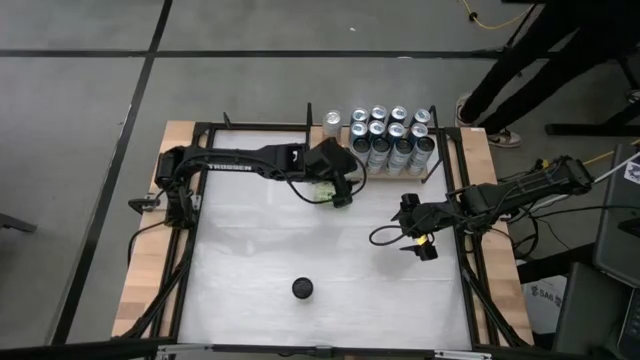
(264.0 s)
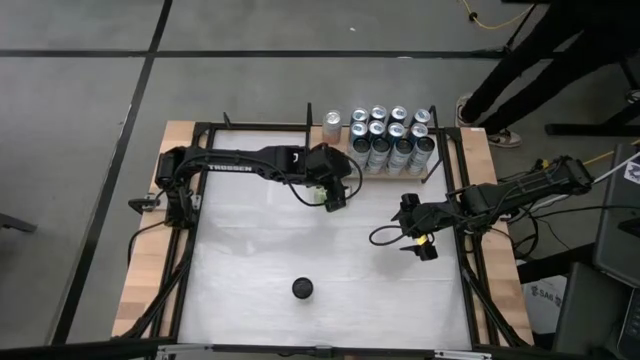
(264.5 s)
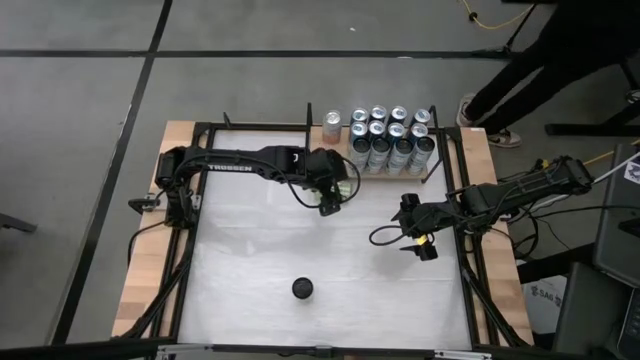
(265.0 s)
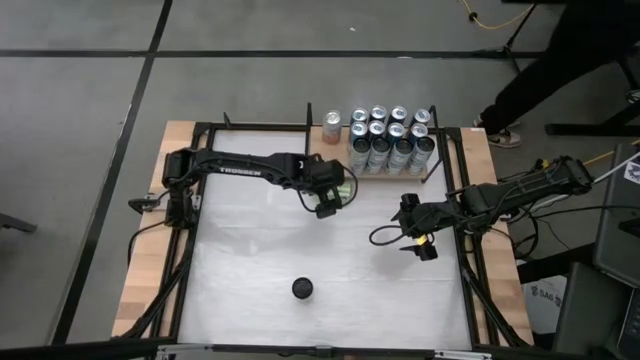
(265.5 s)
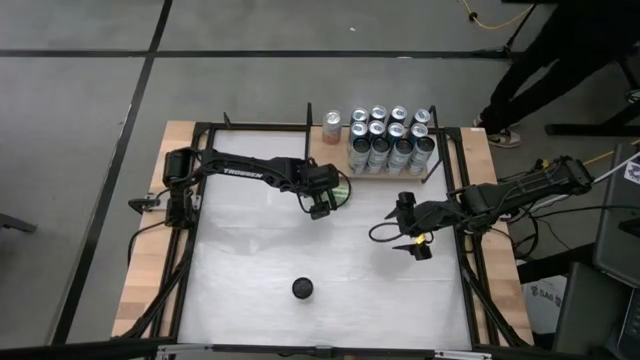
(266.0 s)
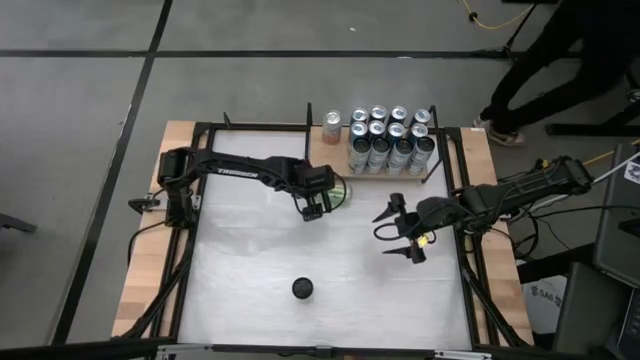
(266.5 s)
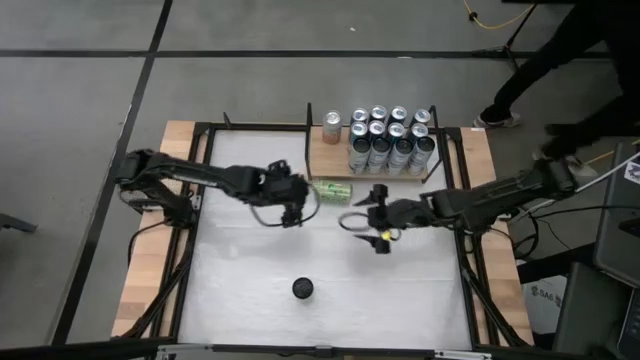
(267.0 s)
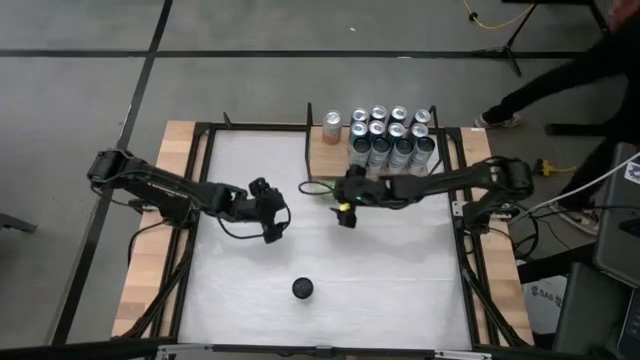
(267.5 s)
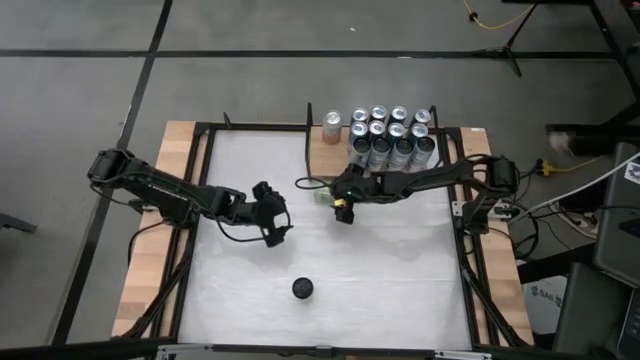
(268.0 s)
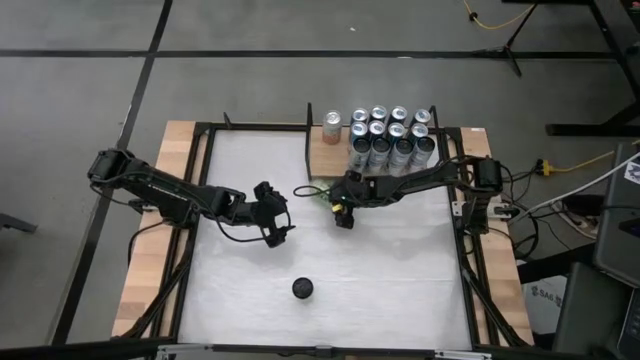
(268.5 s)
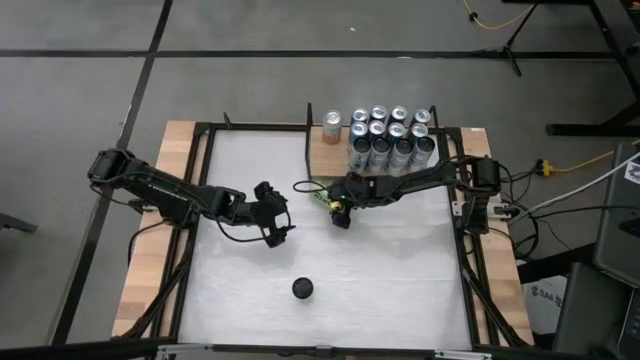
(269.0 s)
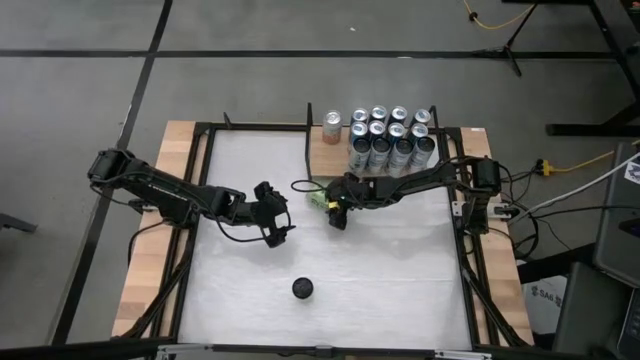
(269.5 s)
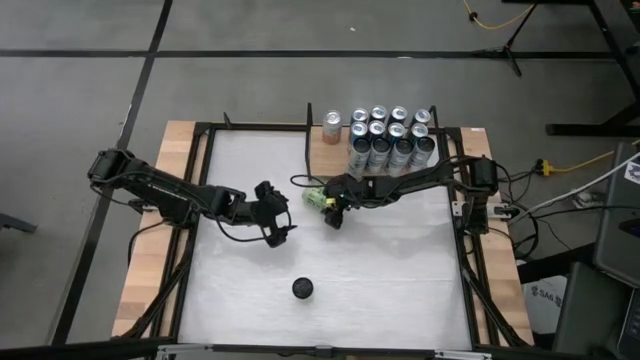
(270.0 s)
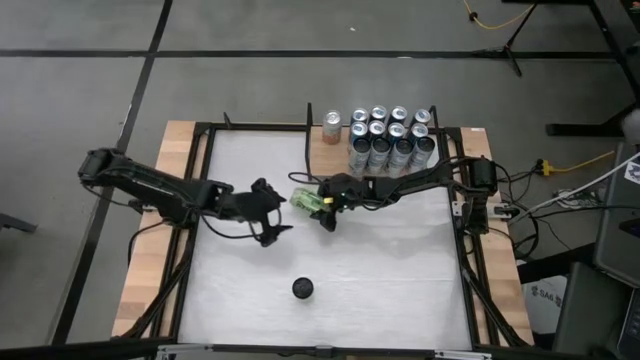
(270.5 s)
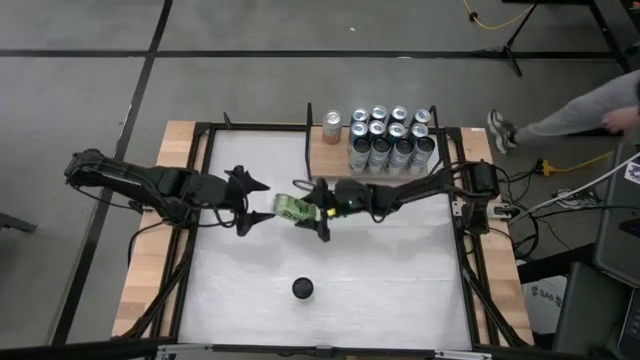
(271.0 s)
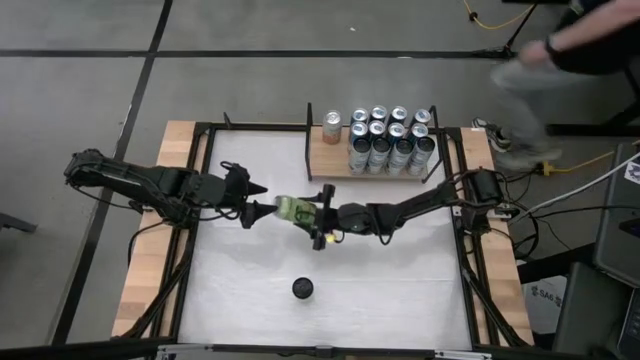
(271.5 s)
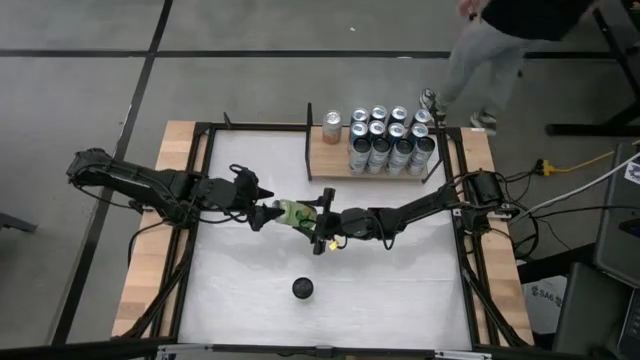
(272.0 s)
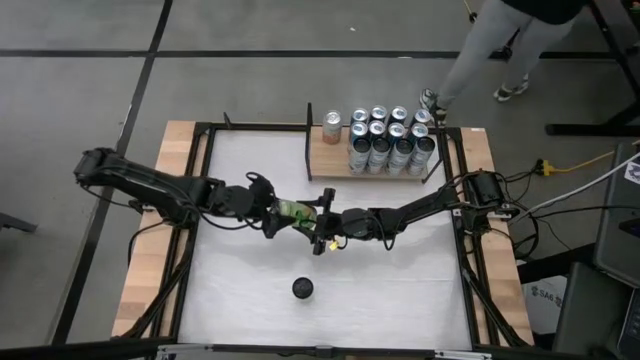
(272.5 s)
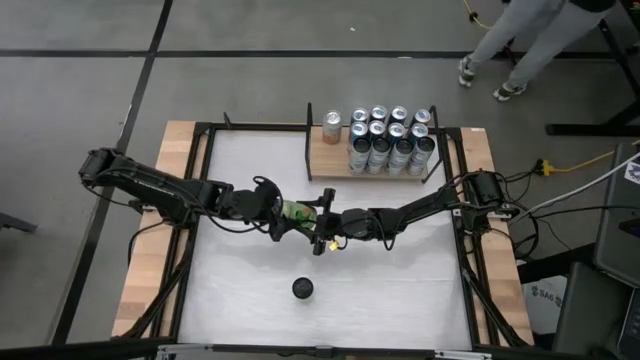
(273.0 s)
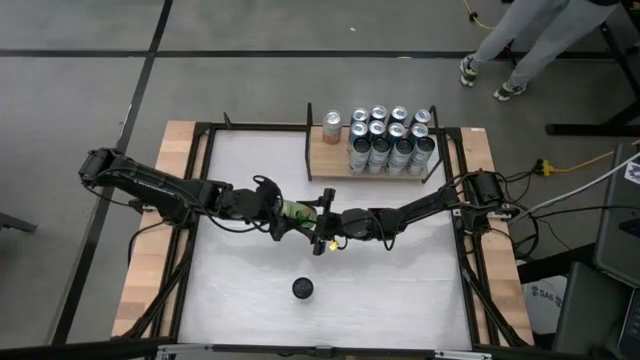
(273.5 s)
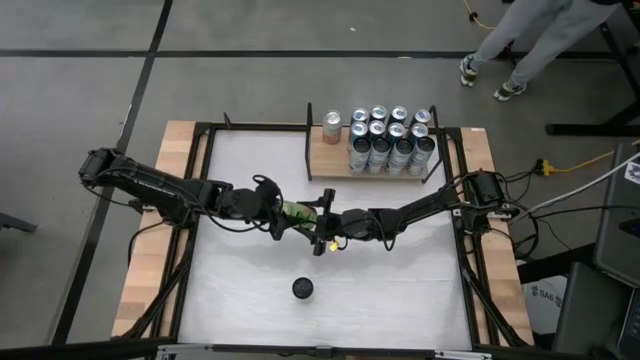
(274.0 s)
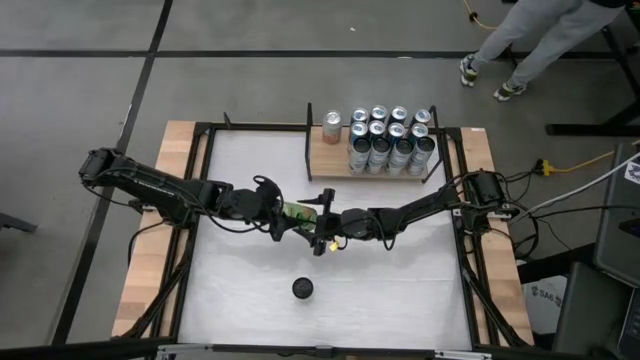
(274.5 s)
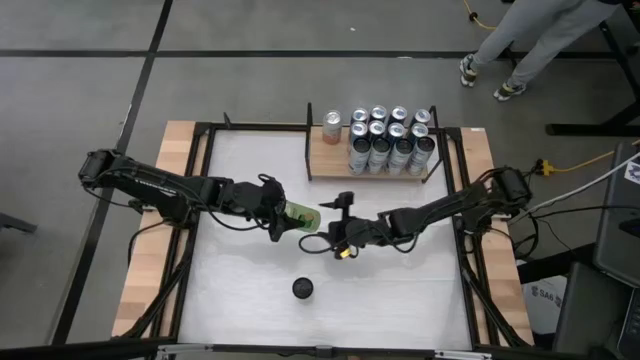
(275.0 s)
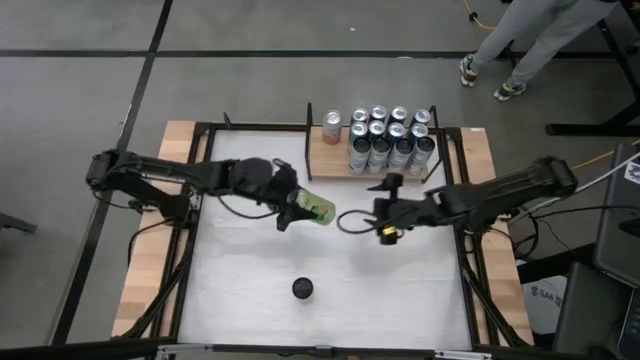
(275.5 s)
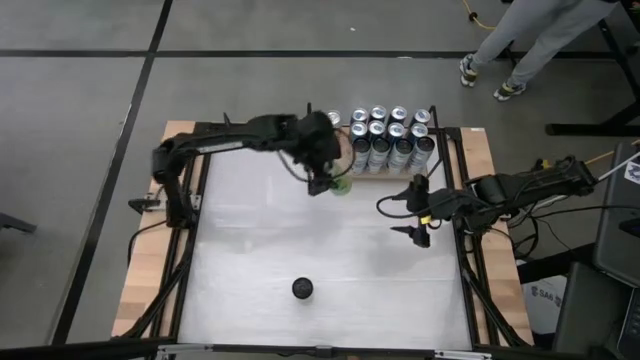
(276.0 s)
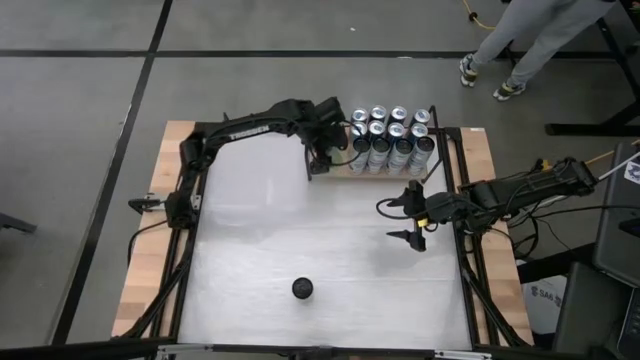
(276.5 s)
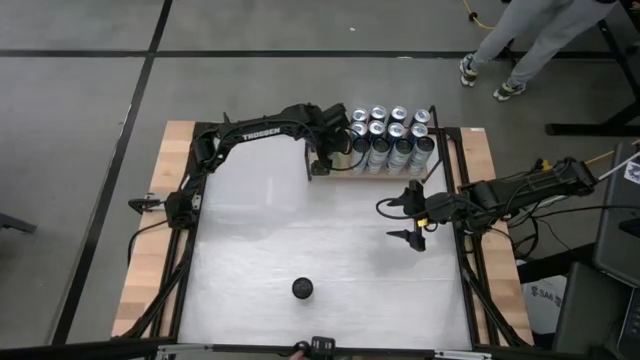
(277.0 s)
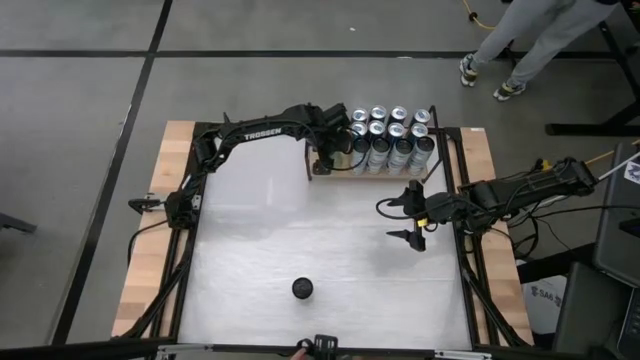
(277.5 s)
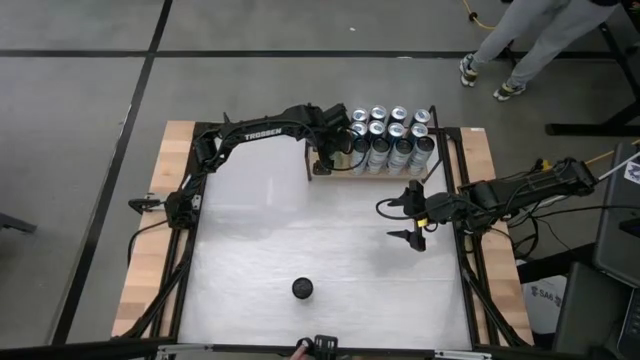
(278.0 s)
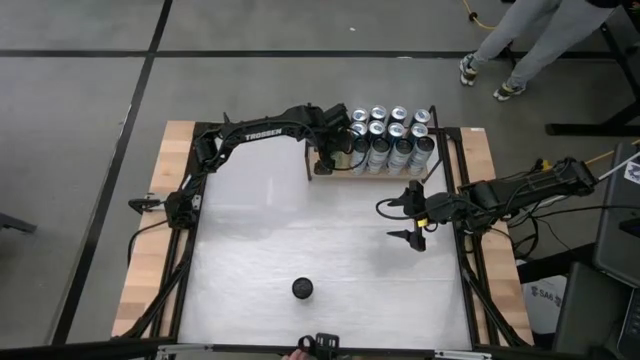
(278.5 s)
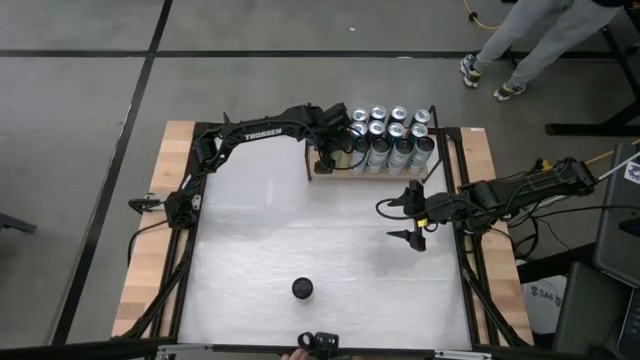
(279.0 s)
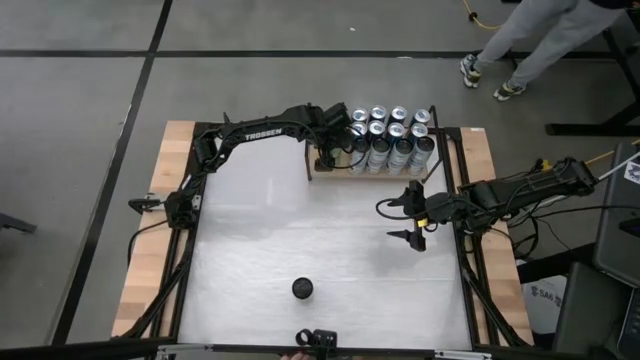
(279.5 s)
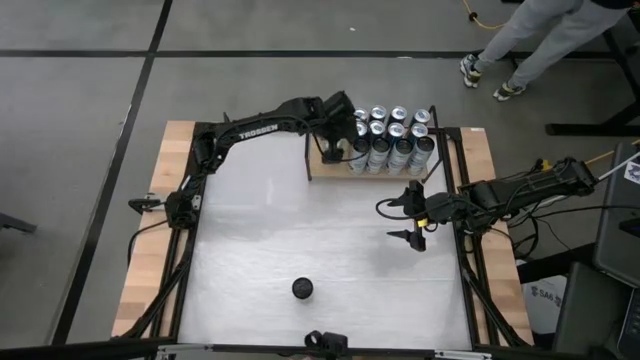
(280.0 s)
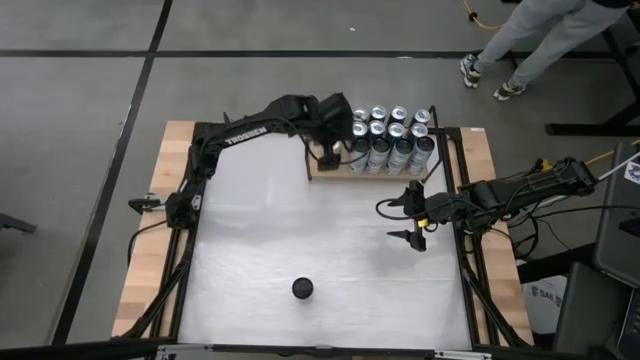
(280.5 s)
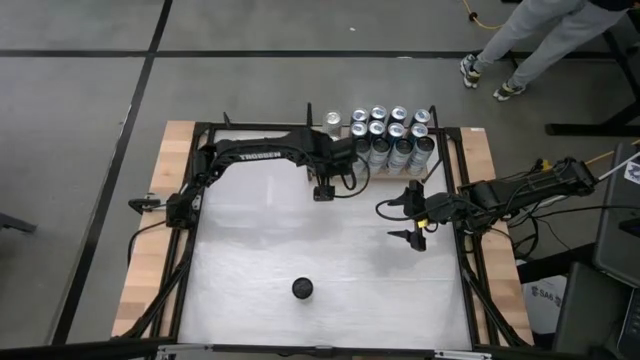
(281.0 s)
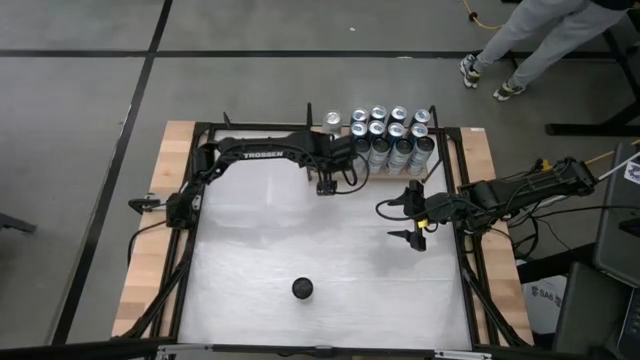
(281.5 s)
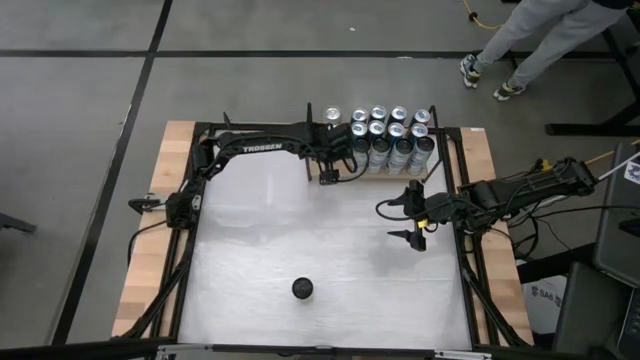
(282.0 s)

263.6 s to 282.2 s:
Task: Place canned beverage on shelf
Put the green soda can on the shelf

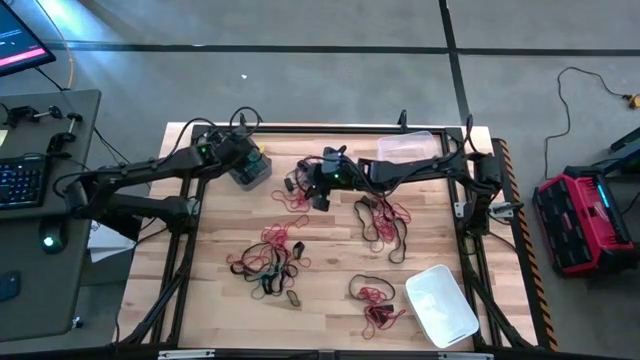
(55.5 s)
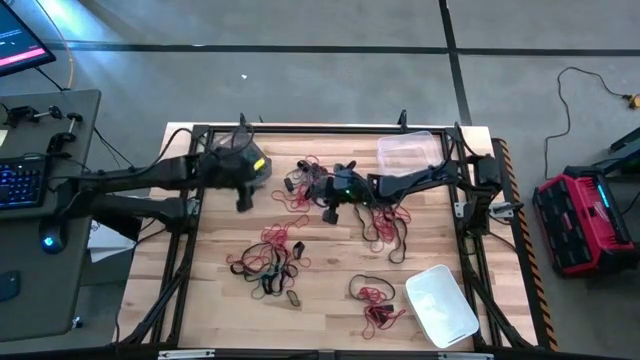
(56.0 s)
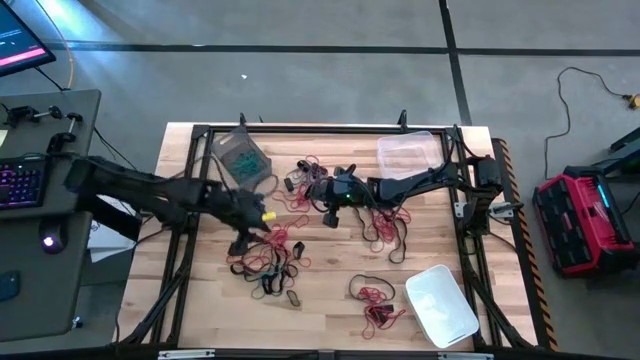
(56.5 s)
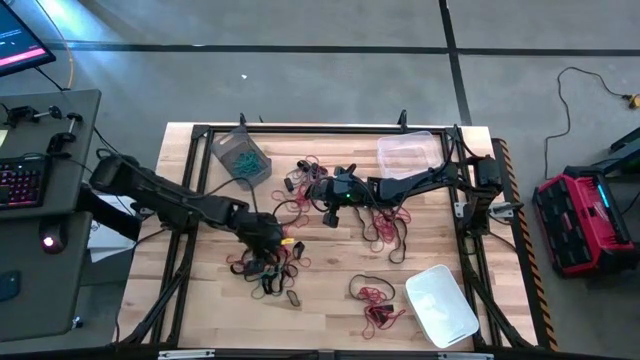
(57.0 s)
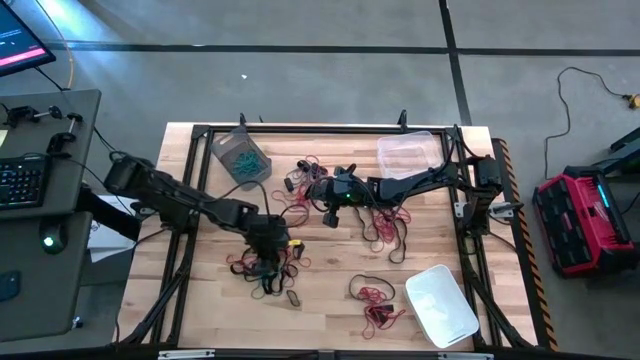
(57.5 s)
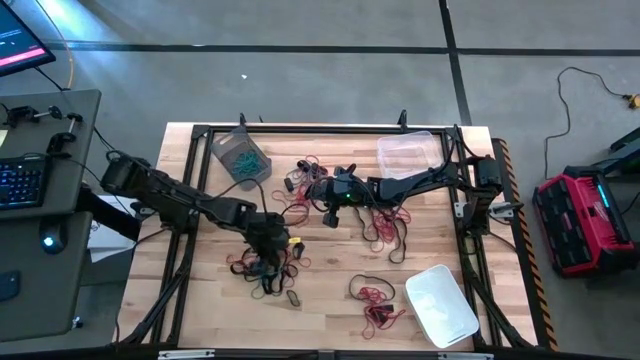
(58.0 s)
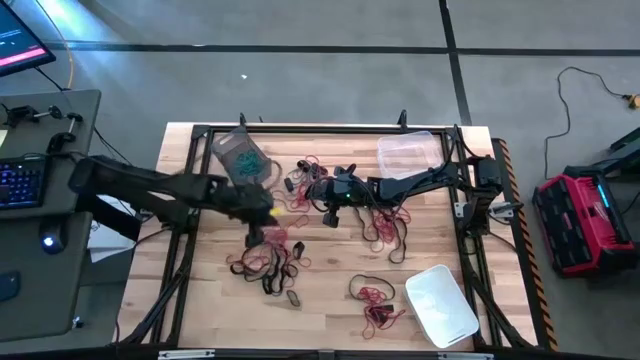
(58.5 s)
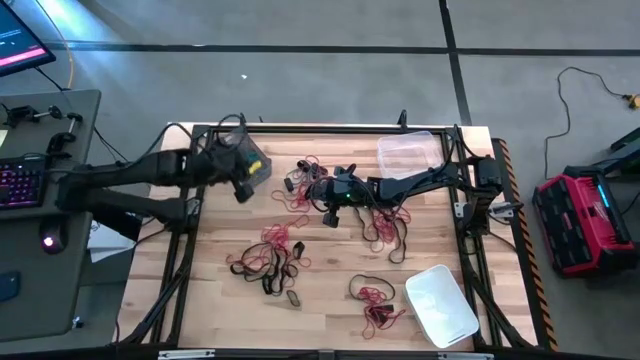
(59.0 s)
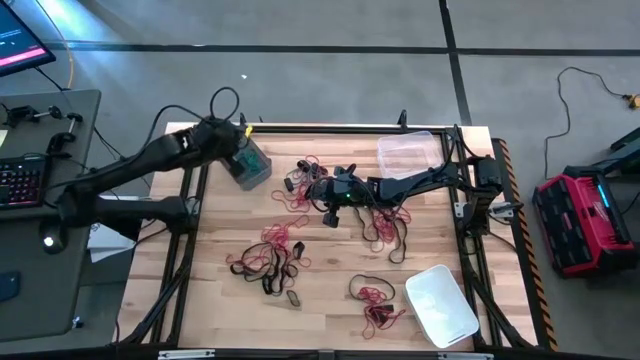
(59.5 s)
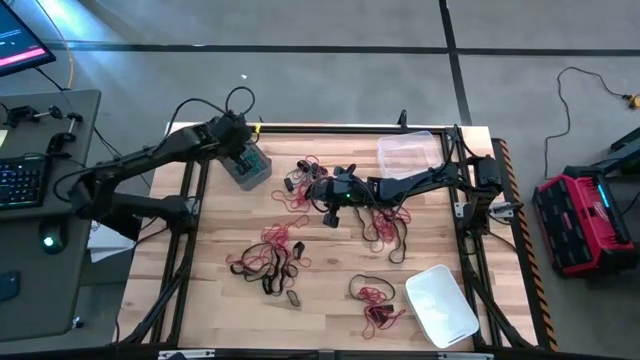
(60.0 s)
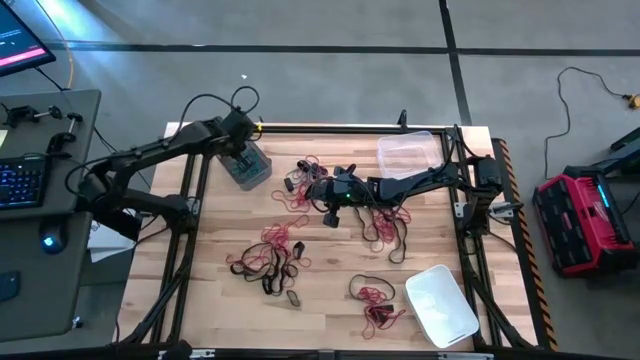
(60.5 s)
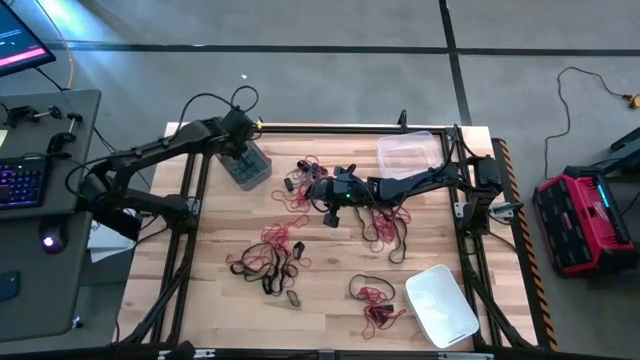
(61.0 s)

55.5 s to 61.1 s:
Task: Sort rubber bands into baskets
Put the blue rubber band into the black bin
